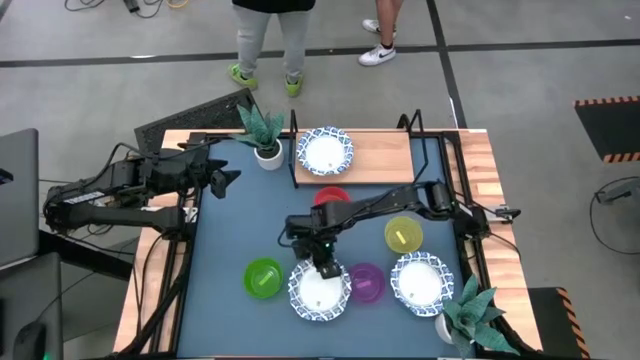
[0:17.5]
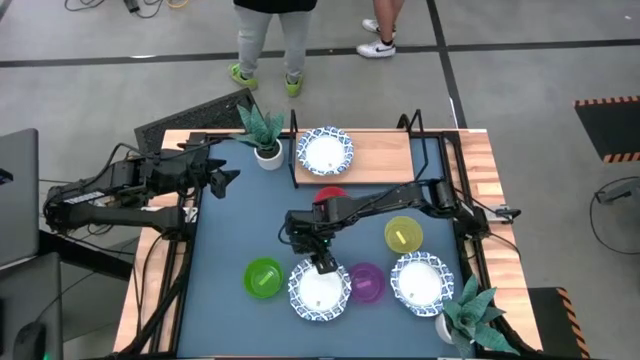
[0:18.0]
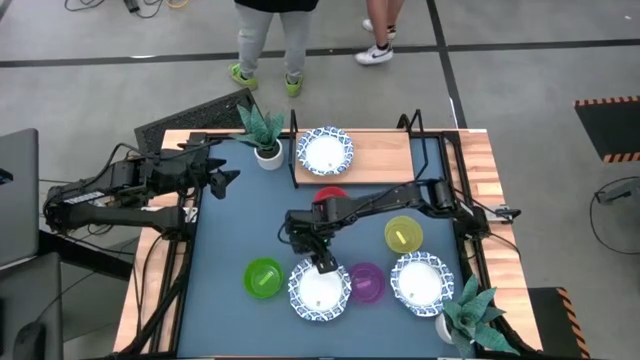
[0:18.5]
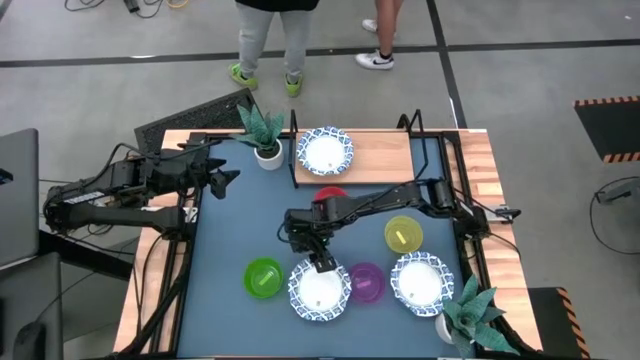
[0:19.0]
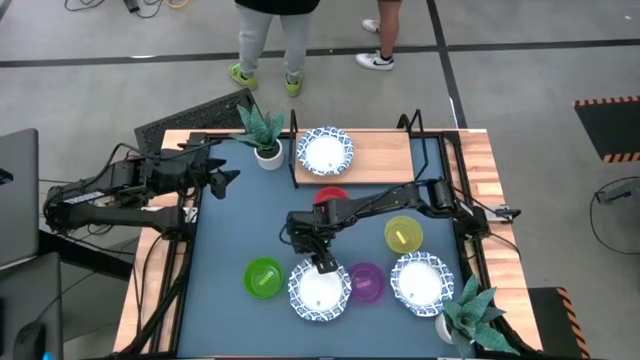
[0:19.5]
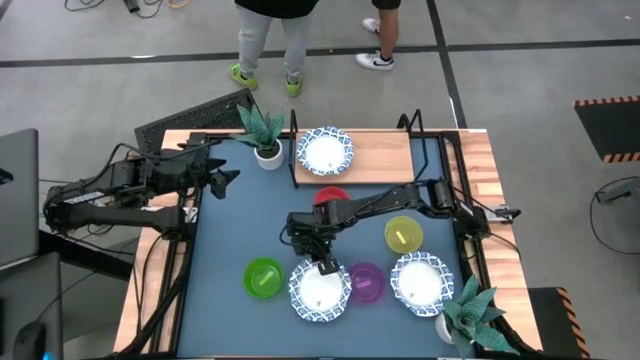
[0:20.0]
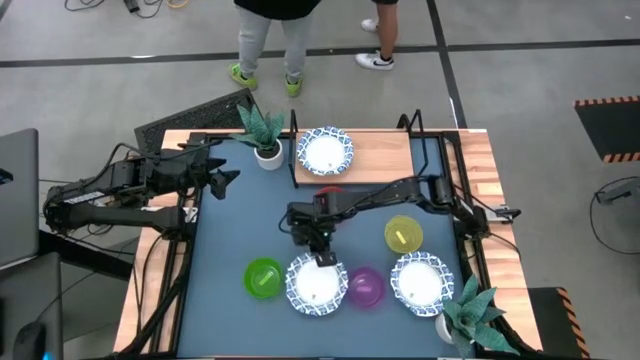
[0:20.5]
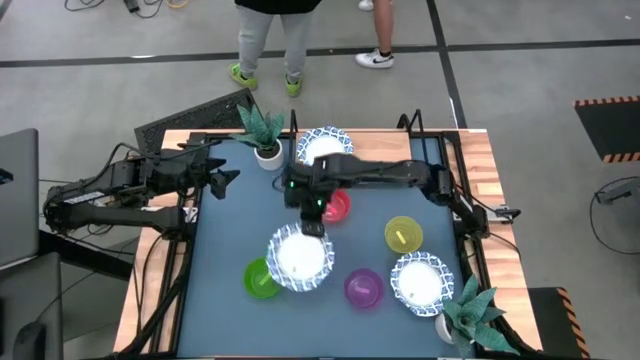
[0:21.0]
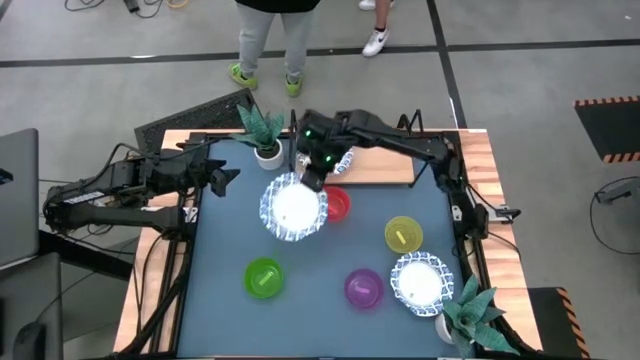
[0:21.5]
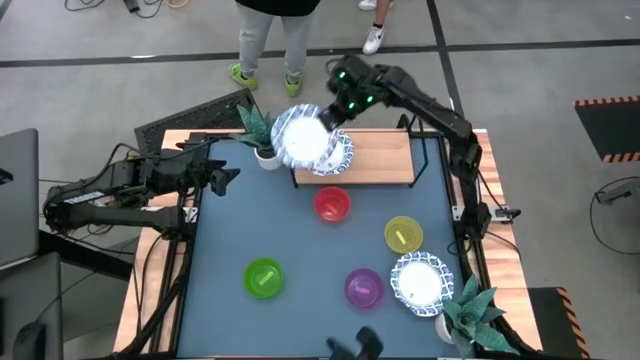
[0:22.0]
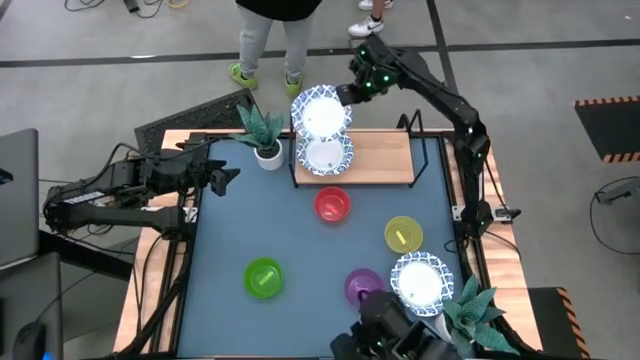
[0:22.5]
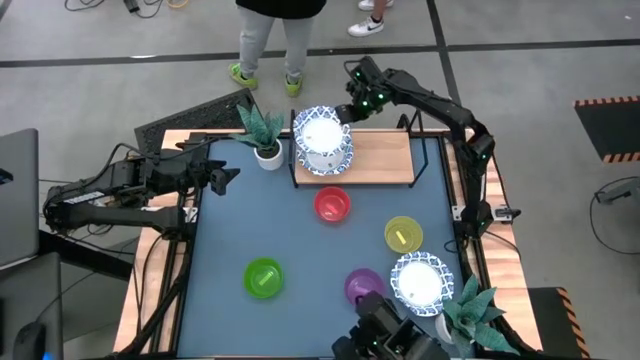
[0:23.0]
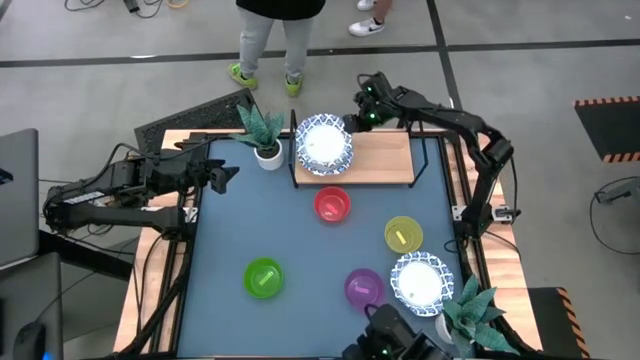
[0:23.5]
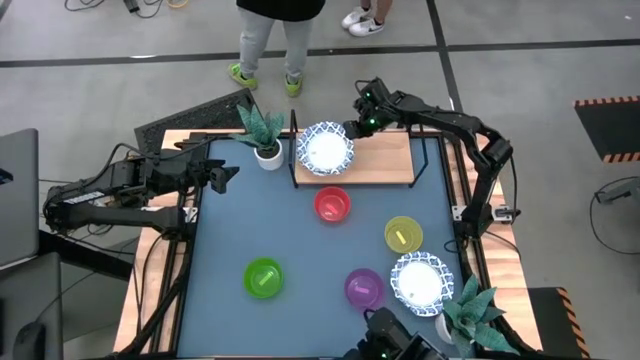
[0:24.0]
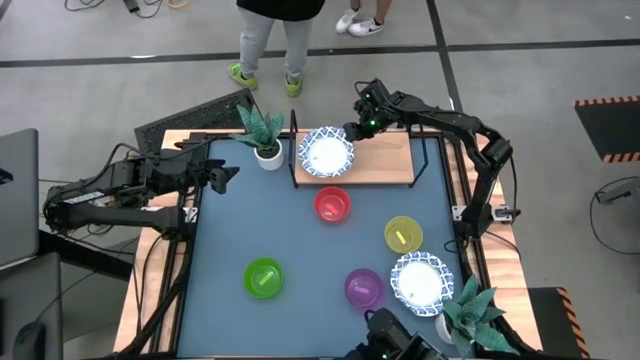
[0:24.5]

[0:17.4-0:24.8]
Task: Place and stack bowls onto a shelf
Stack the white patterned bowl on top of the white patterned bowl on the shelf

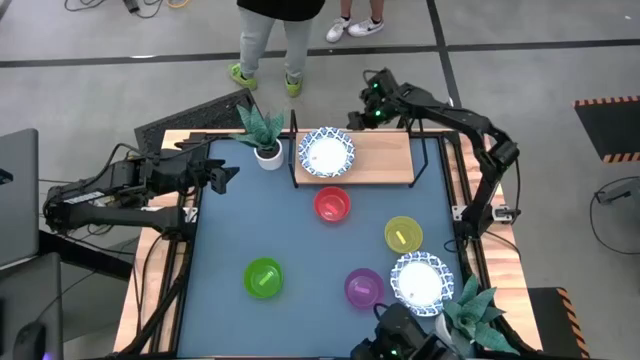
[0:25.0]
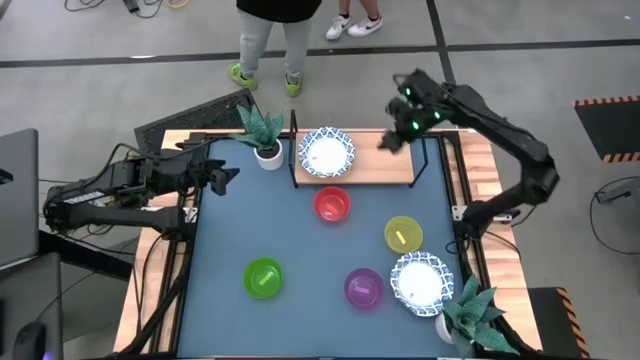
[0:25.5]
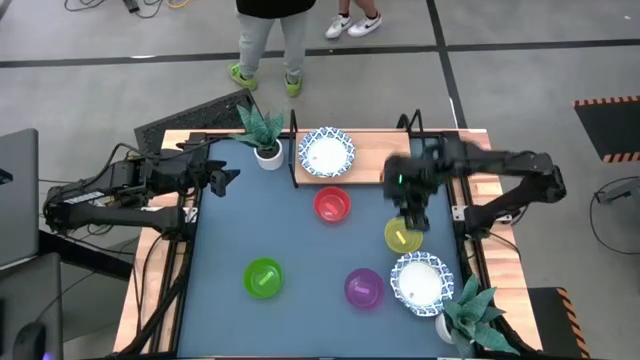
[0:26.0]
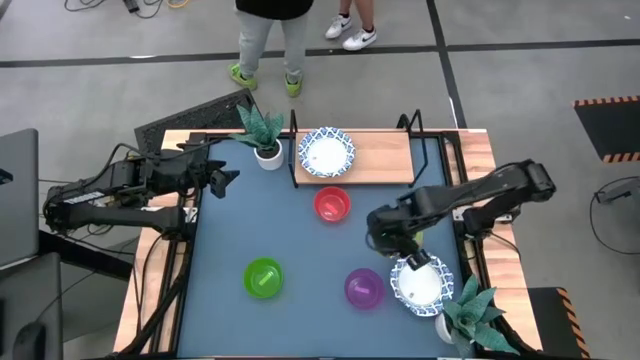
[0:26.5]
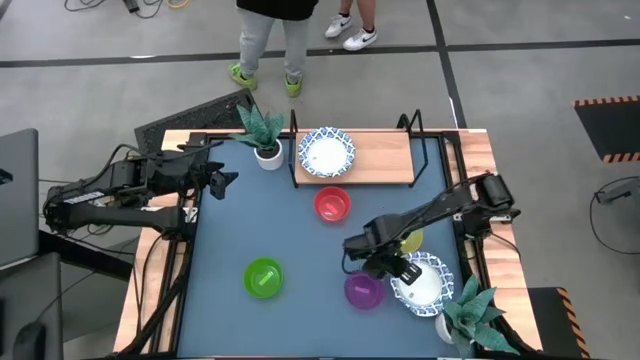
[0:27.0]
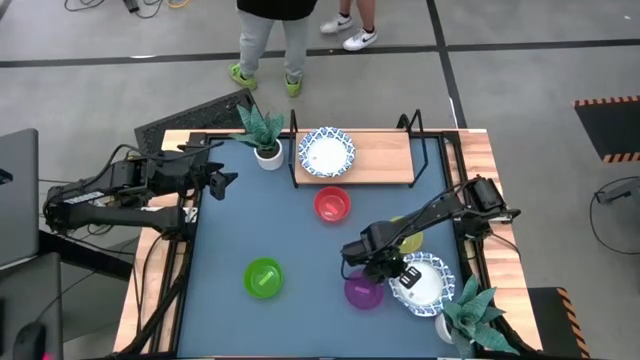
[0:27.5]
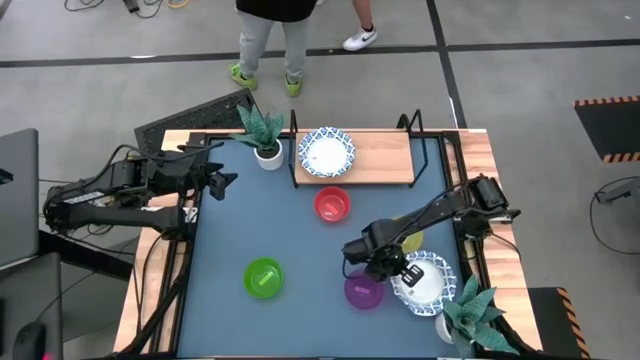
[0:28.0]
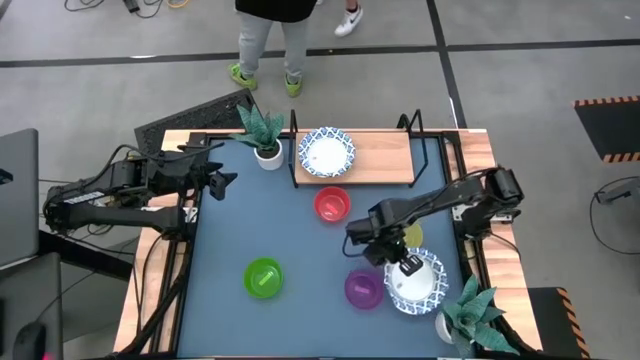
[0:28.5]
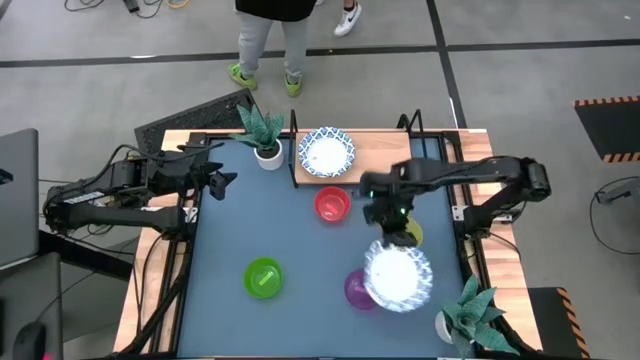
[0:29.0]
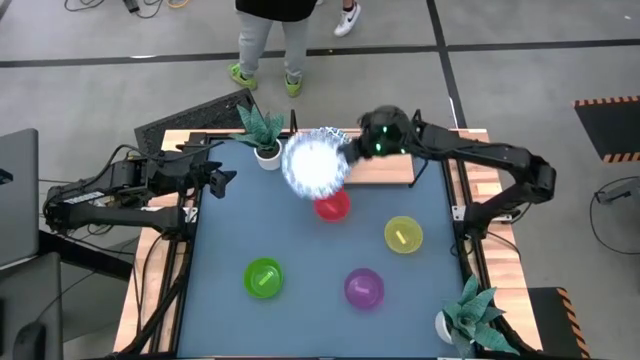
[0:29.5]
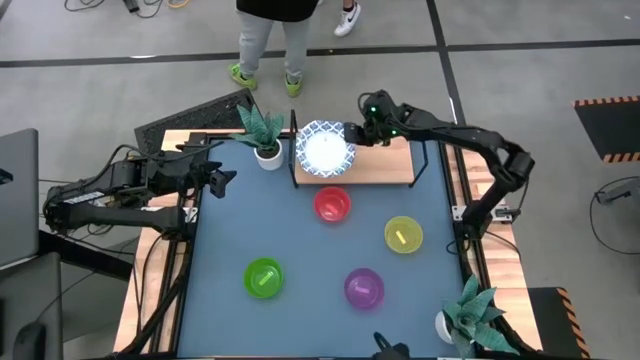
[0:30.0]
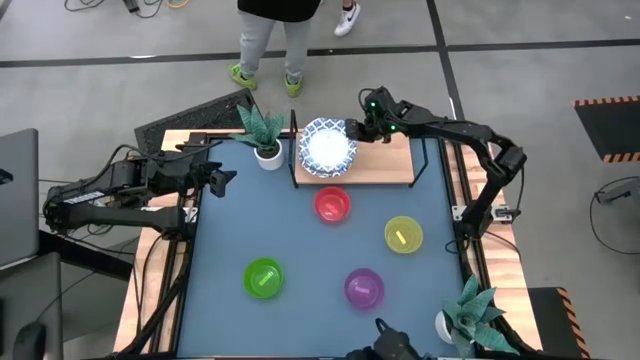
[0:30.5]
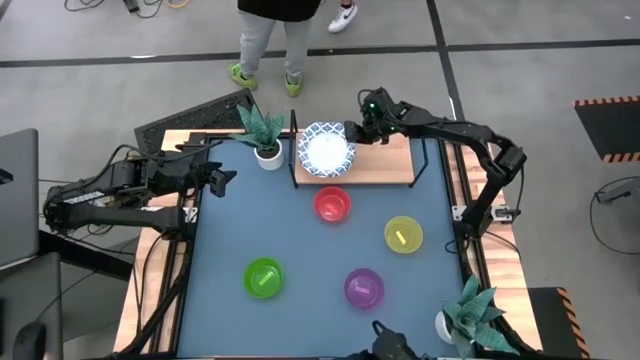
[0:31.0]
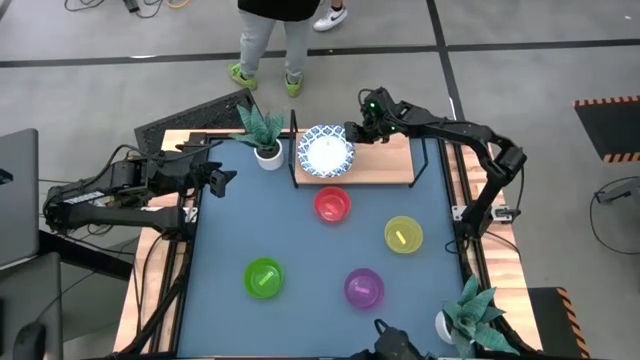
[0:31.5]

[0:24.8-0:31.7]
Stack the white patterned bowl on top of the white patterned bowl on the shelf

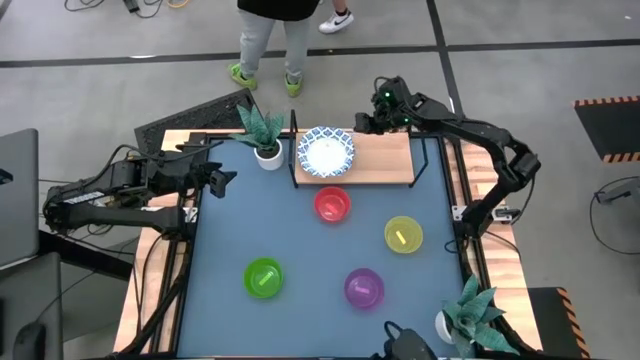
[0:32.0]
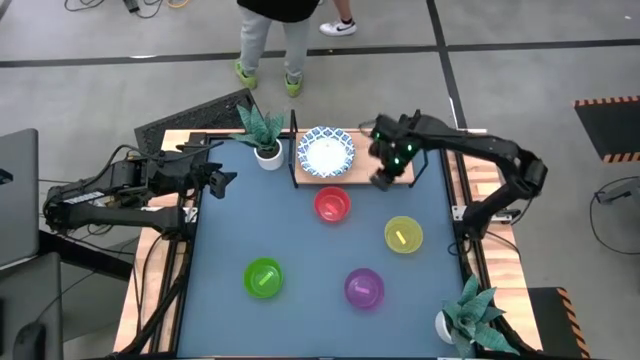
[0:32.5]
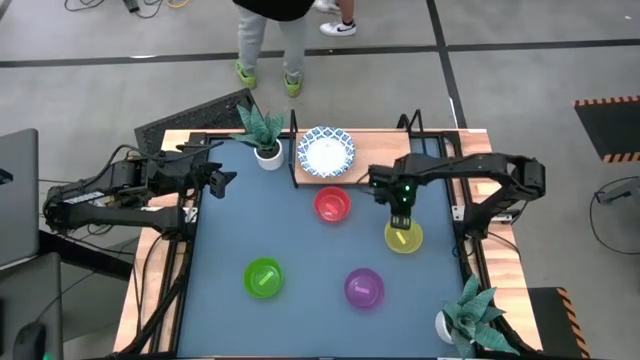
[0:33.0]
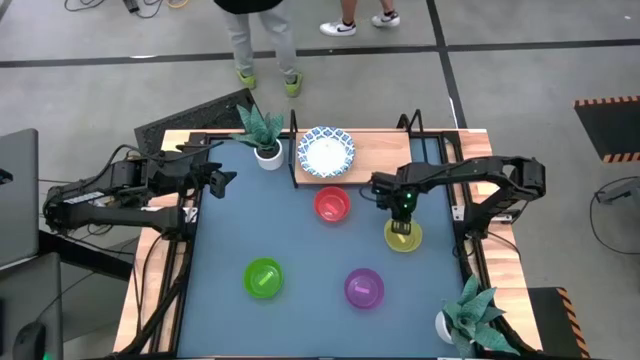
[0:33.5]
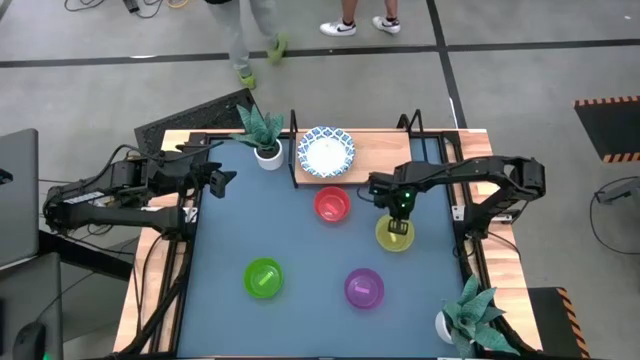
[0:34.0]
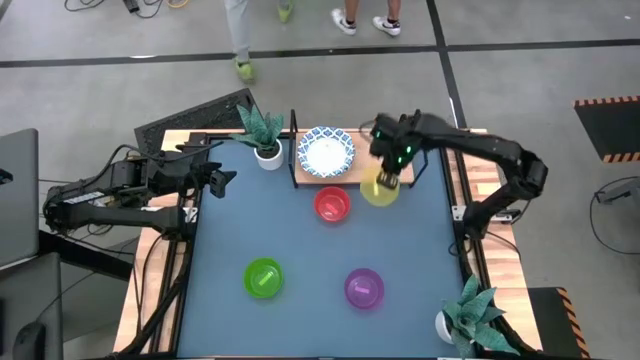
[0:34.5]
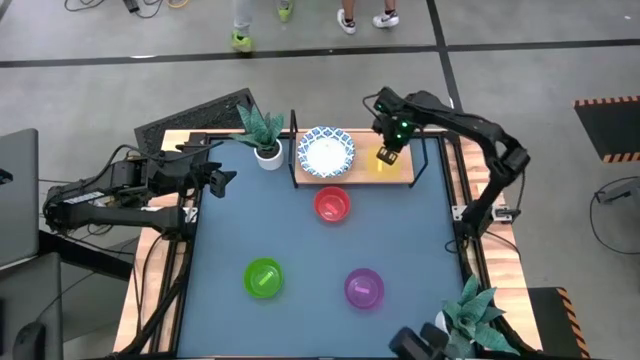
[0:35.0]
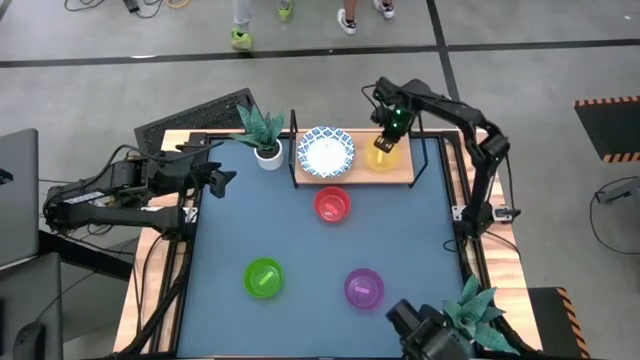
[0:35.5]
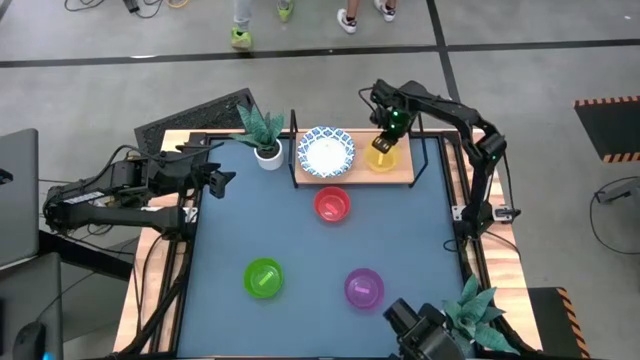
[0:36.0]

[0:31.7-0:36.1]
Put the yellow bowl on the shelf
